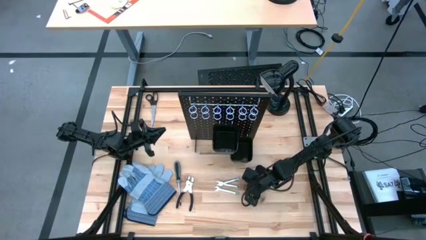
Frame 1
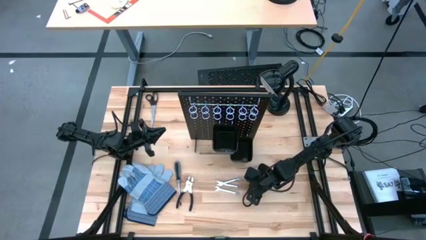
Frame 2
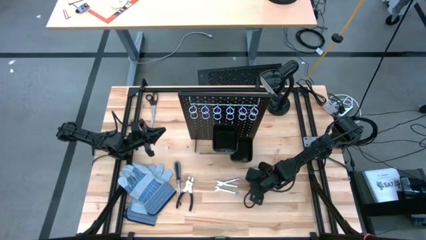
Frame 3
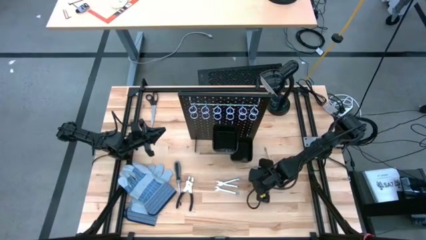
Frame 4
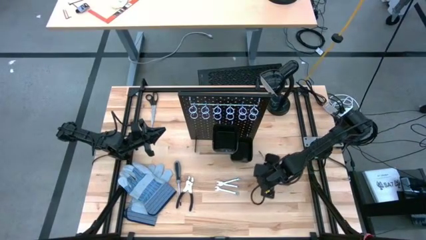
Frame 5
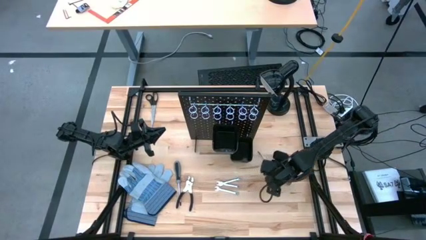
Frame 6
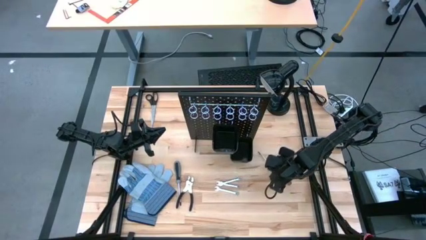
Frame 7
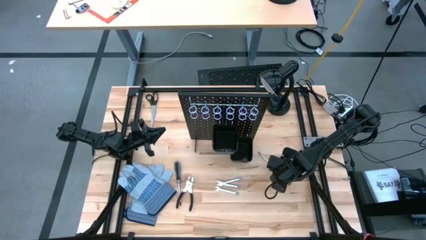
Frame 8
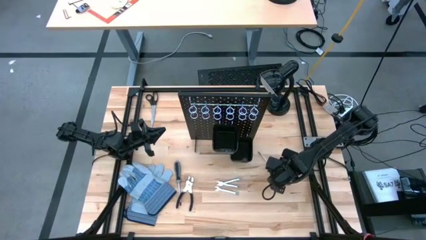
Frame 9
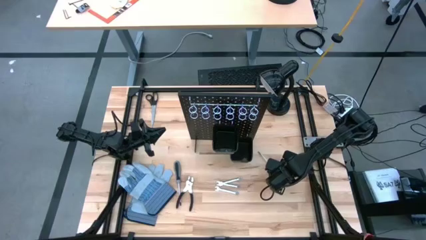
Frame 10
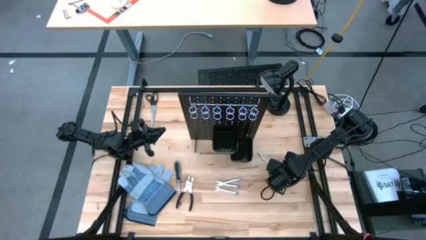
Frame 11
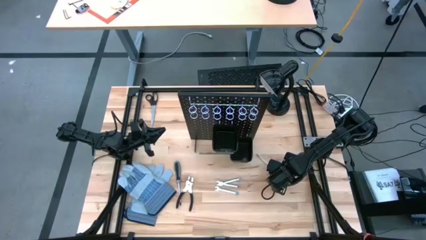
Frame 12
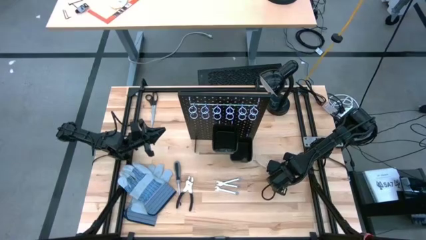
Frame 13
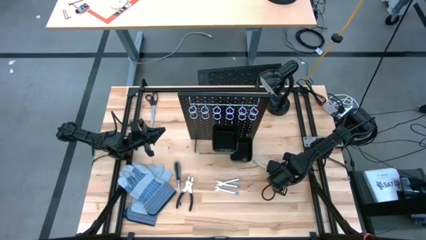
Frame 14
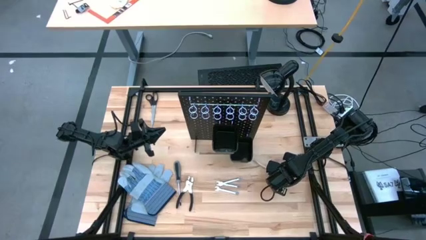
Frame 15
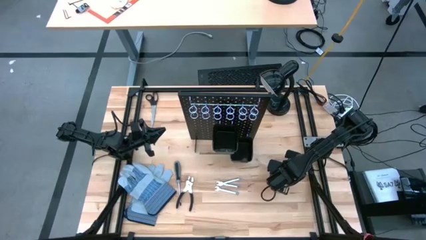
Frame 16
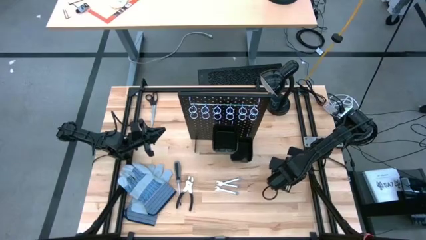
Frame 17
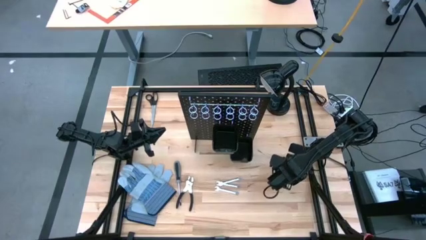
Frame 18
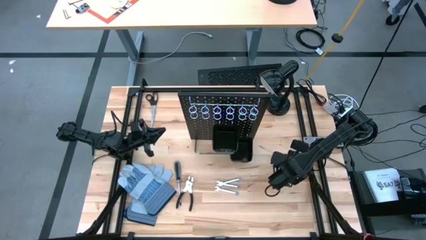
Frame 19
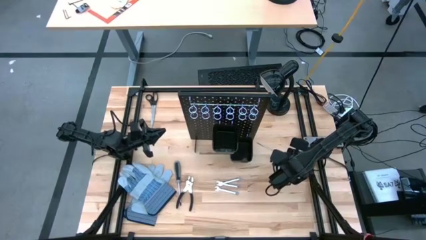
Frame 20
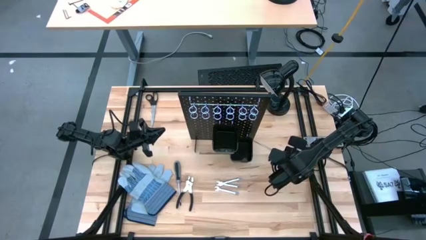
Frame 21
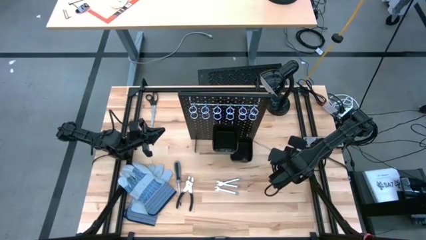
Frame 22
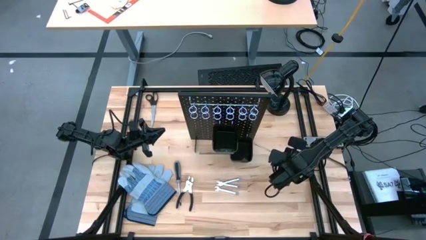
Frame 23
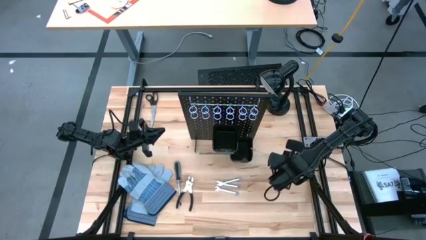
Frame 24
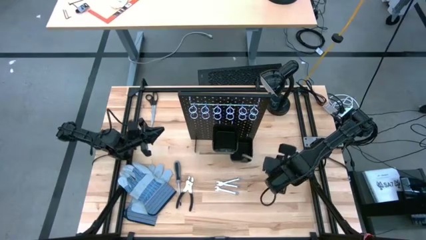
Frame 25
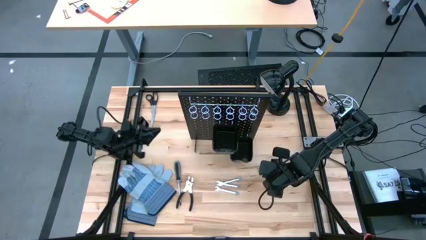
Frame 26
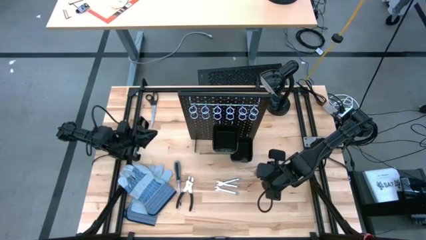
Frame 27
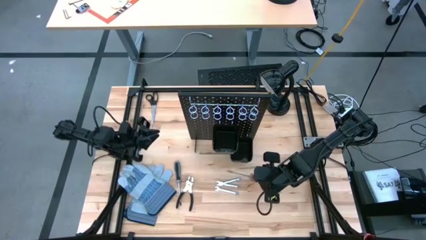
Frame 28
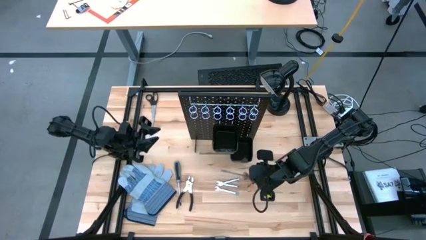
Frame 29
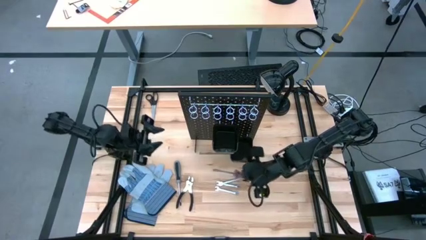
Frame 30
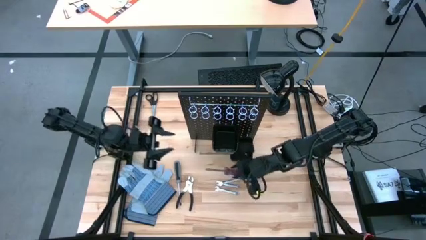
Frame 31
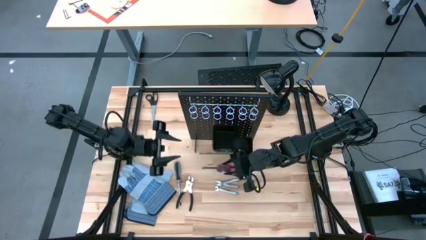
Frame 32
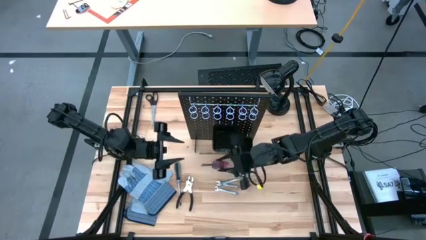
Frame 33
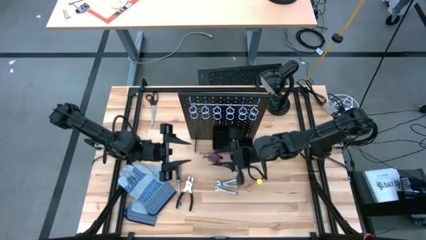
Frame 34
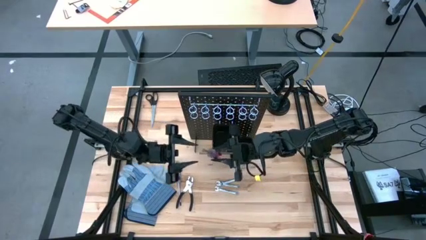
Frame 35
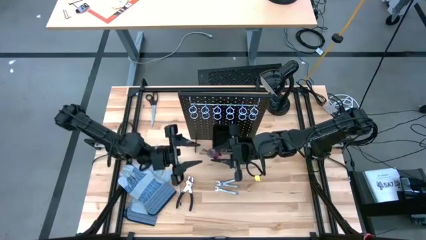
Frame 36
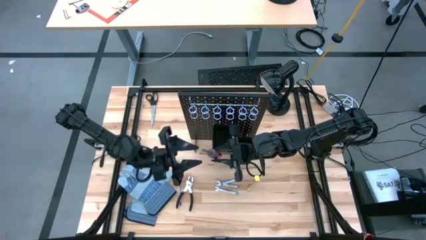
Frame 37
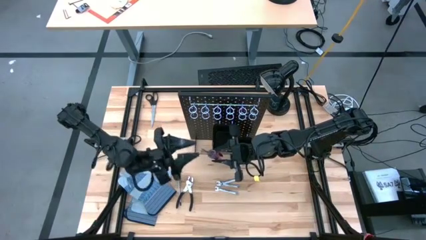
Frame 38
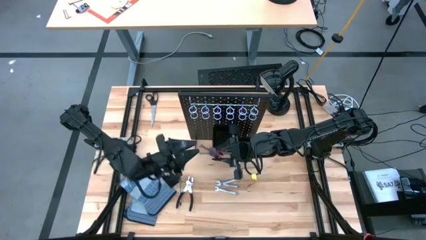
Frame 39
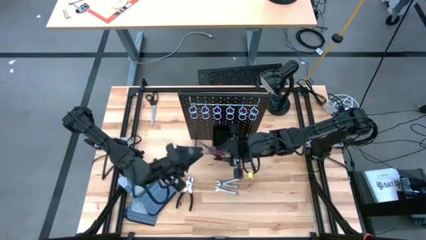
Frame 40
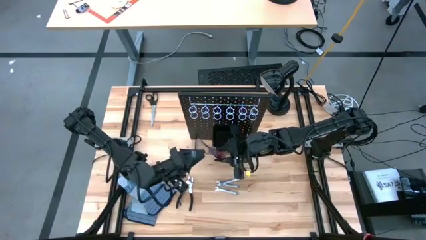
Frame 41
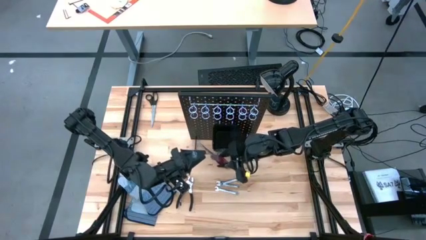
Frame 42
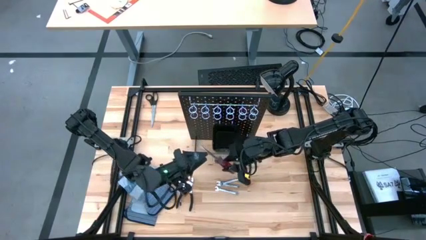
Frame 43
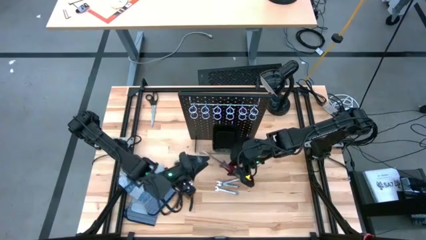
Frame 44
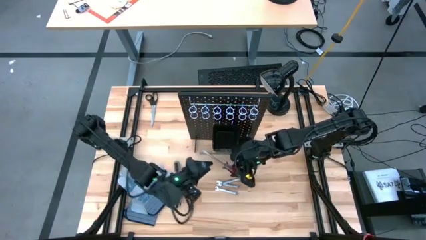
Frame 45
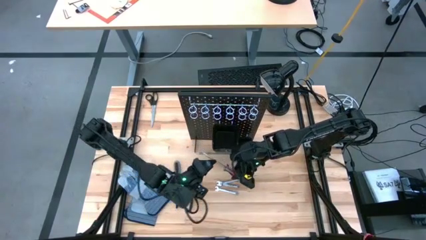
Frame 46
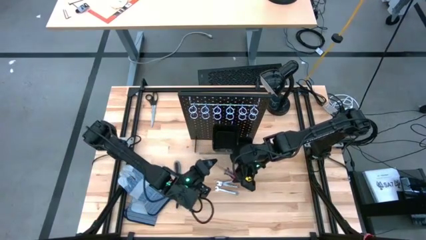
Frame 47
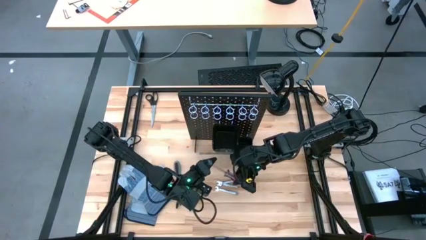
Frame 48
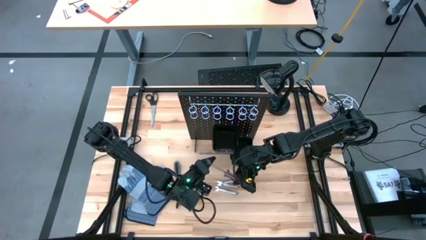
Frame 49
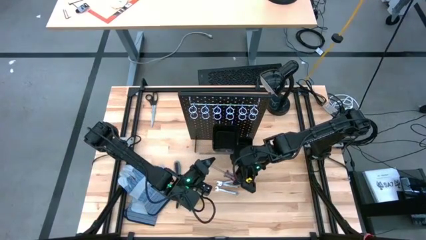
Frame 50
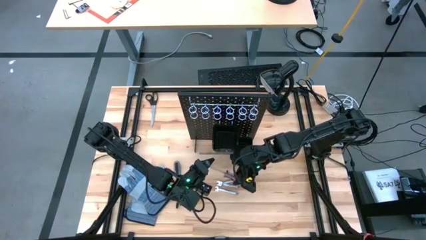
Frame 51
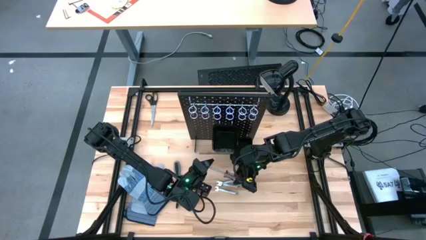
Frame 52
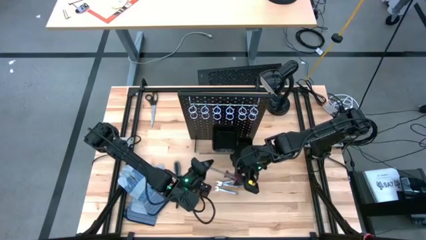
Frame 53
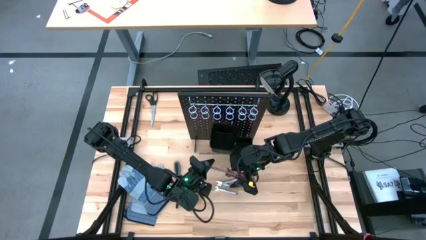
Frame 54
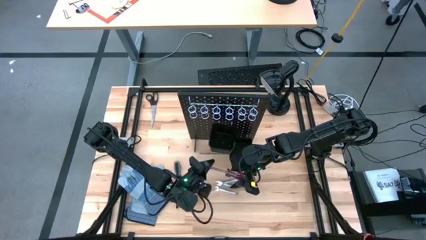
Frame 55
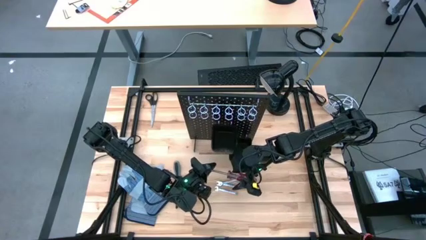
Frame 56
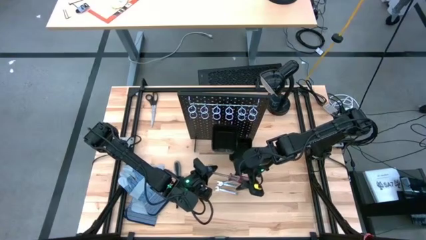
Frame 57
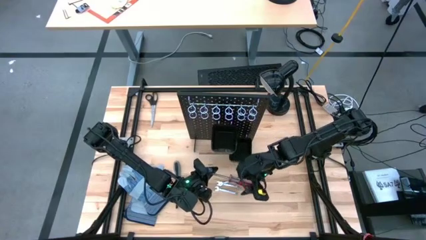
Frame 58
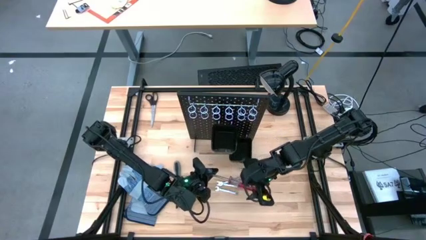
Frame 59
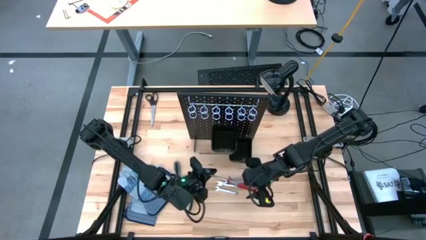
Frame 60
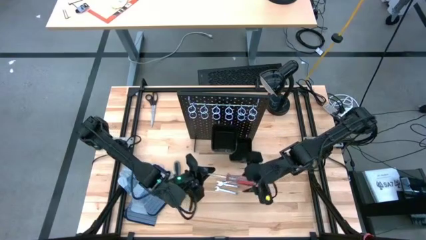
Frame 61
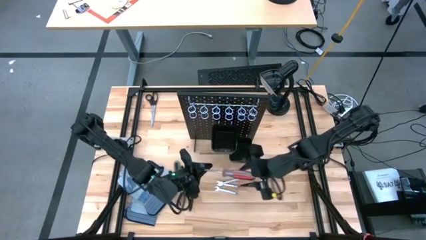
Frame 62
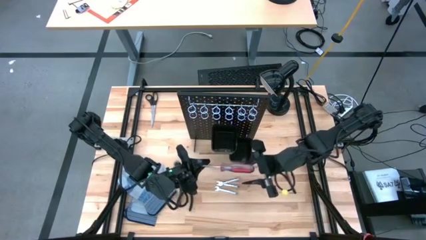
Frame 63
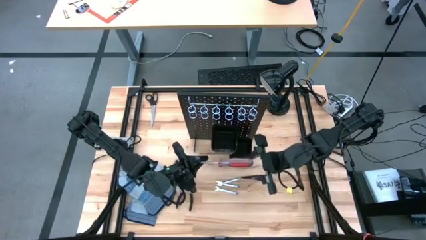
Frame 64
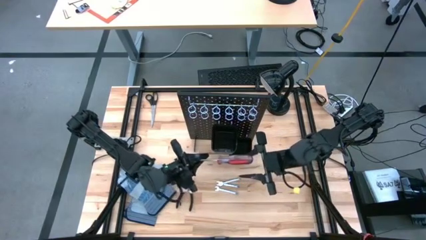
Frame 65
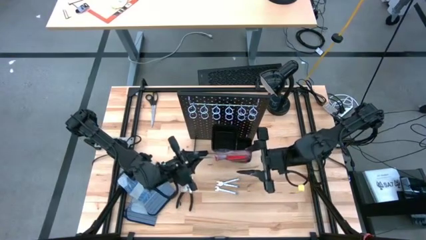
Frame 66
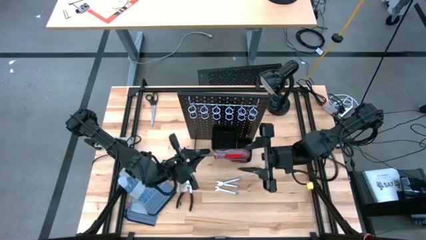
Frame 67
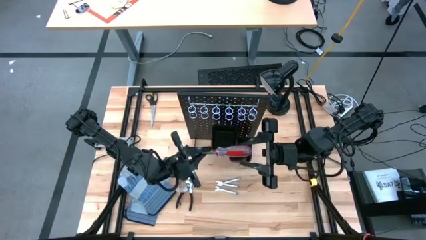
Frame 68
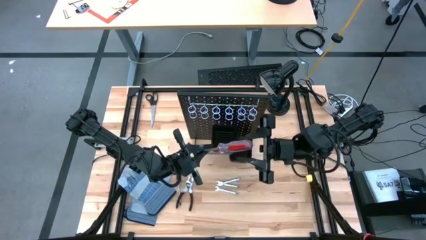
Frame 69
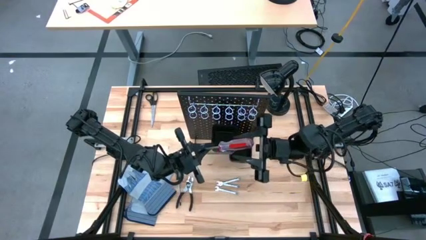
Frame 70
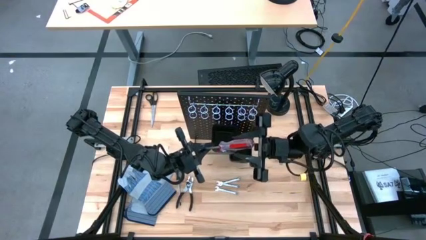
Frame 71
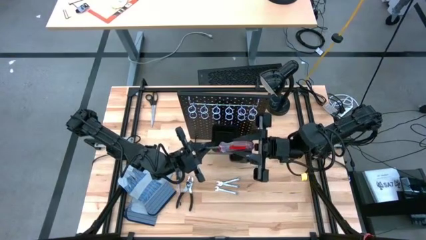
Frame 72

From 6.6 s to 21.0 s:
Task: Hang tools onto peg board
Hang the red screwdriver on the black peg board
